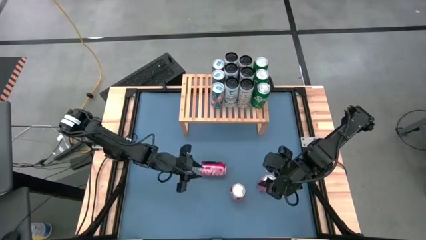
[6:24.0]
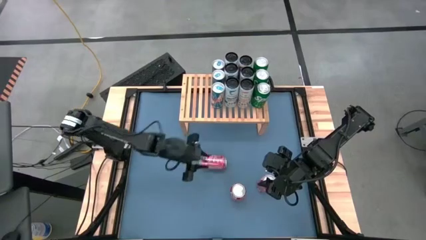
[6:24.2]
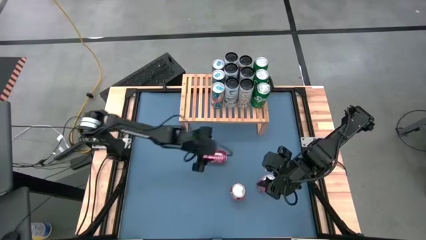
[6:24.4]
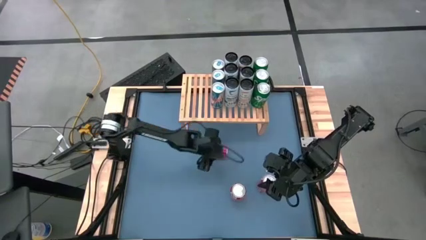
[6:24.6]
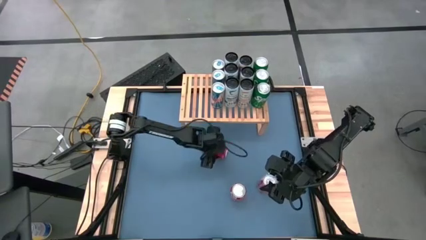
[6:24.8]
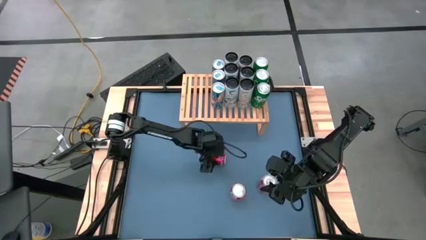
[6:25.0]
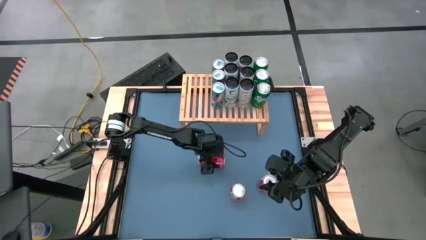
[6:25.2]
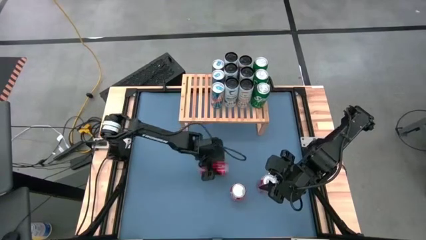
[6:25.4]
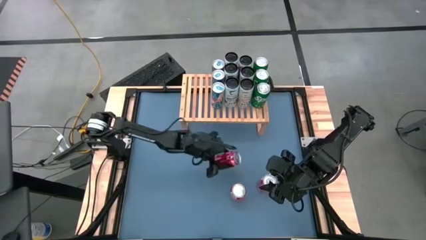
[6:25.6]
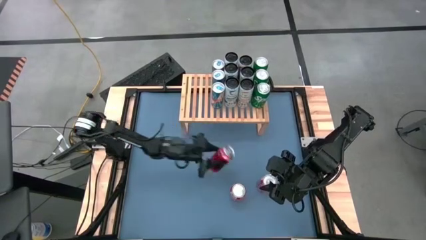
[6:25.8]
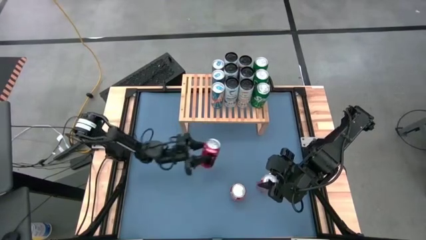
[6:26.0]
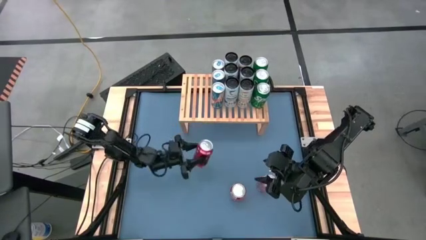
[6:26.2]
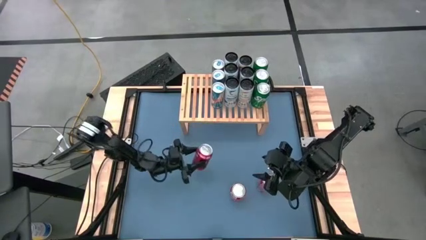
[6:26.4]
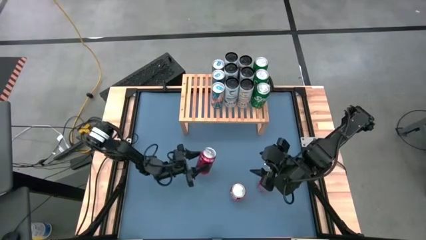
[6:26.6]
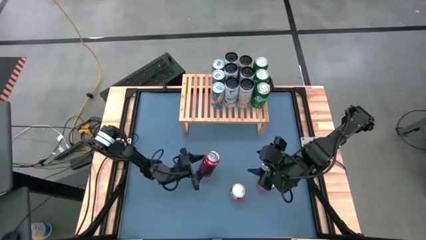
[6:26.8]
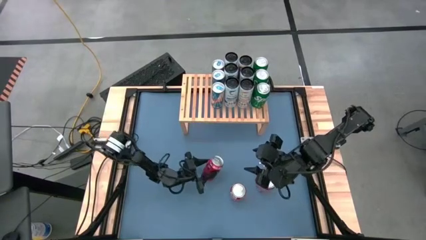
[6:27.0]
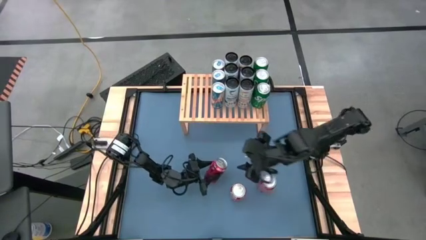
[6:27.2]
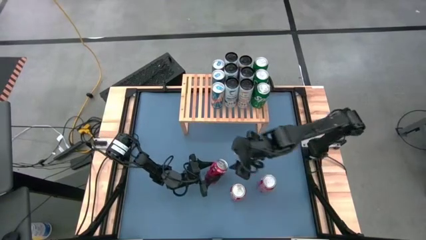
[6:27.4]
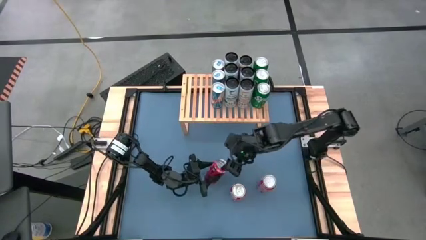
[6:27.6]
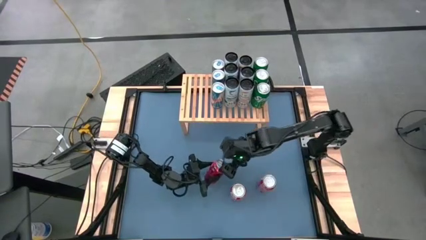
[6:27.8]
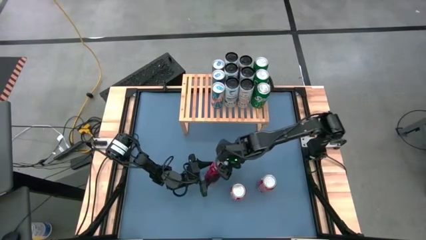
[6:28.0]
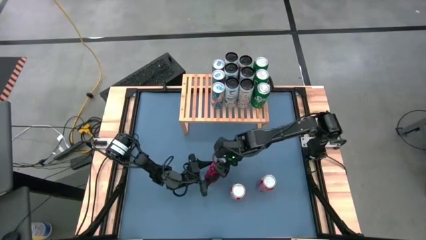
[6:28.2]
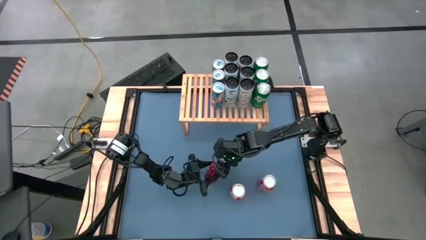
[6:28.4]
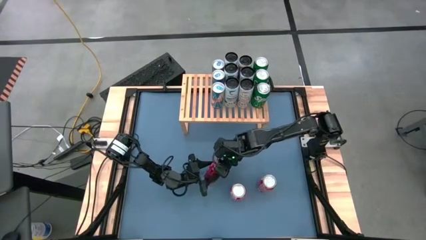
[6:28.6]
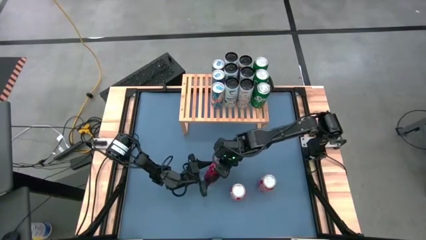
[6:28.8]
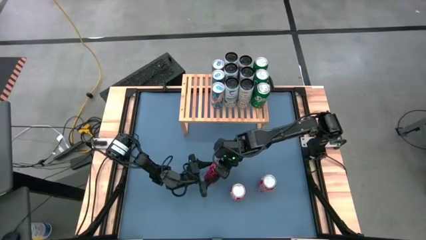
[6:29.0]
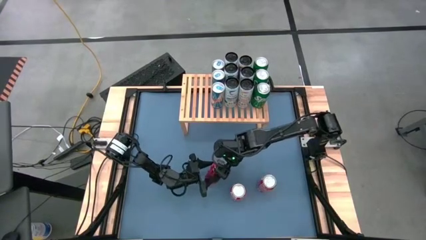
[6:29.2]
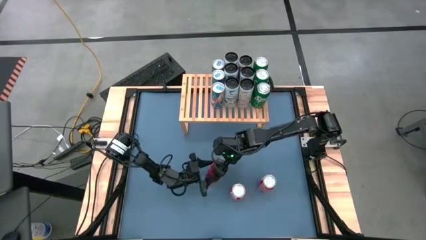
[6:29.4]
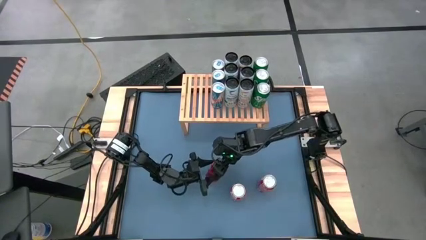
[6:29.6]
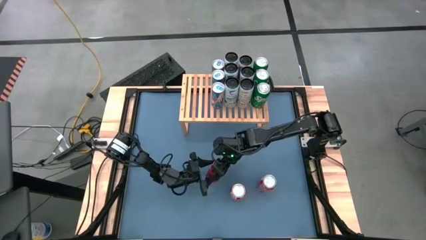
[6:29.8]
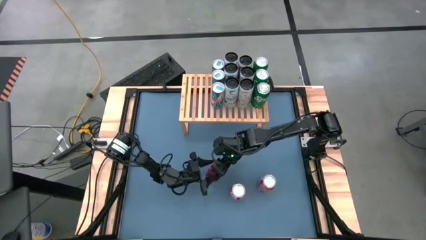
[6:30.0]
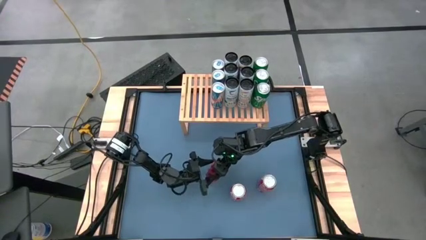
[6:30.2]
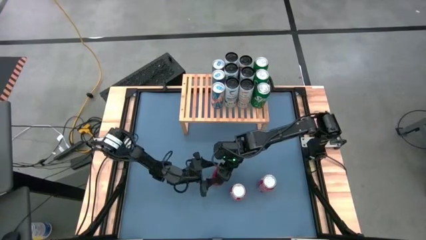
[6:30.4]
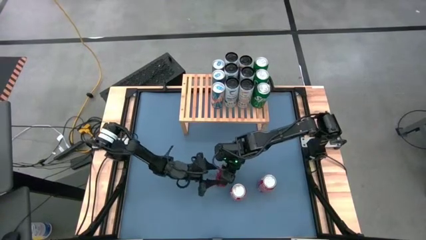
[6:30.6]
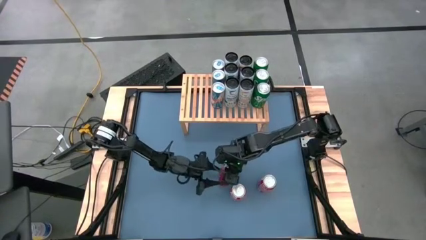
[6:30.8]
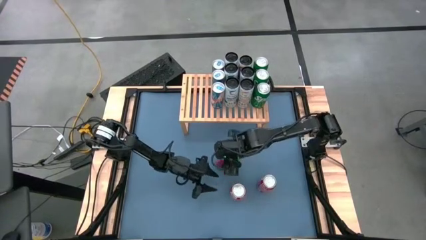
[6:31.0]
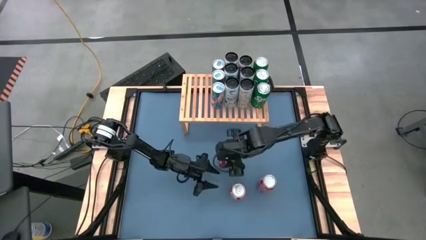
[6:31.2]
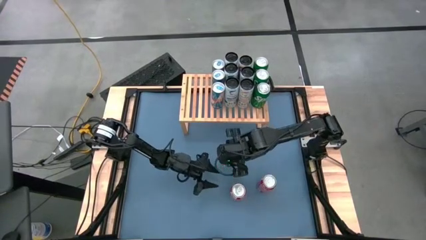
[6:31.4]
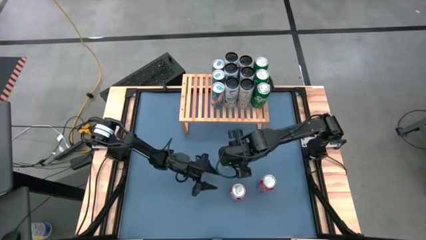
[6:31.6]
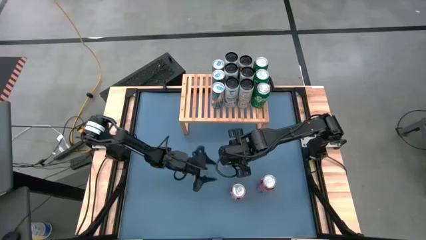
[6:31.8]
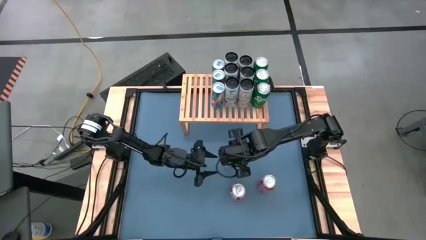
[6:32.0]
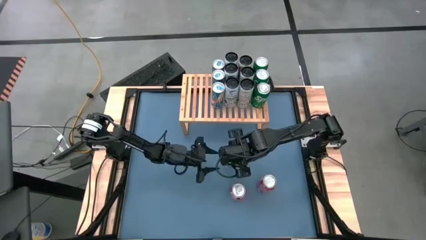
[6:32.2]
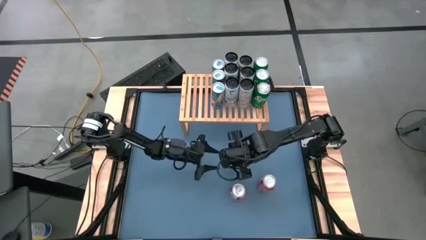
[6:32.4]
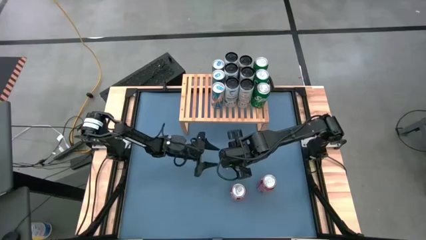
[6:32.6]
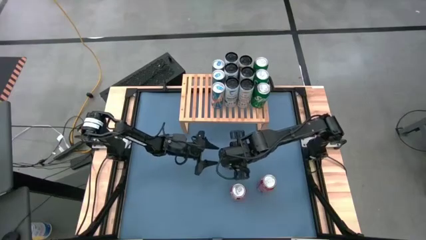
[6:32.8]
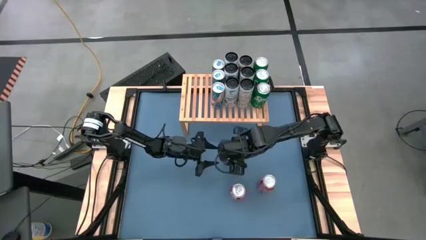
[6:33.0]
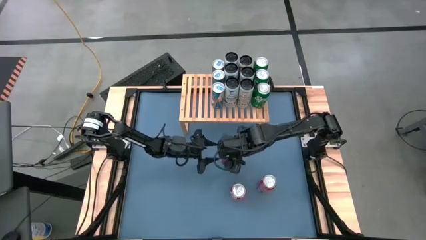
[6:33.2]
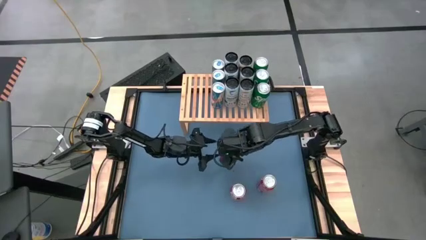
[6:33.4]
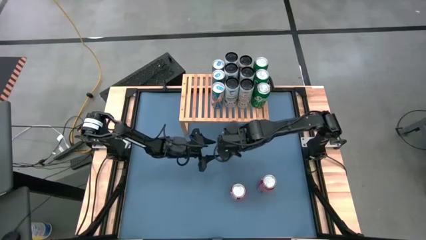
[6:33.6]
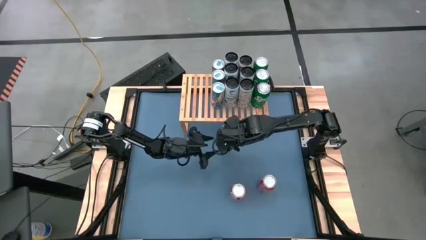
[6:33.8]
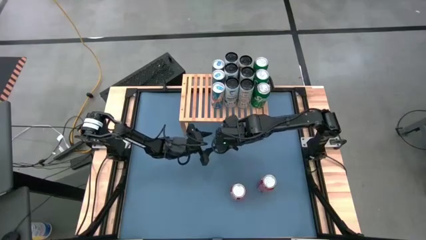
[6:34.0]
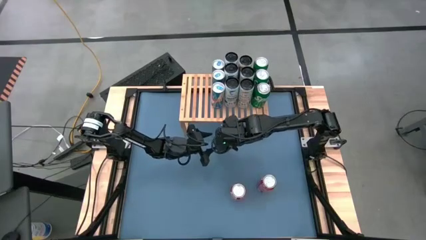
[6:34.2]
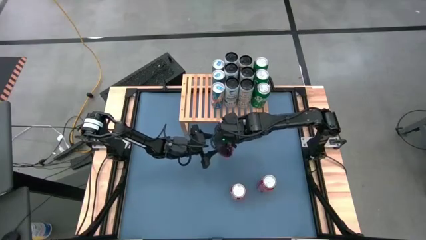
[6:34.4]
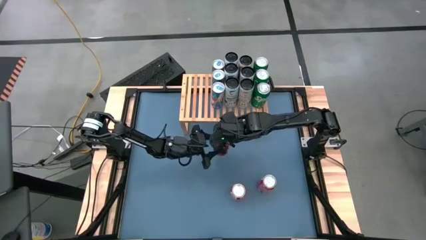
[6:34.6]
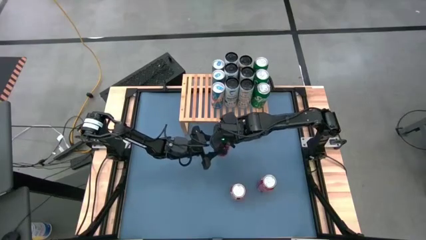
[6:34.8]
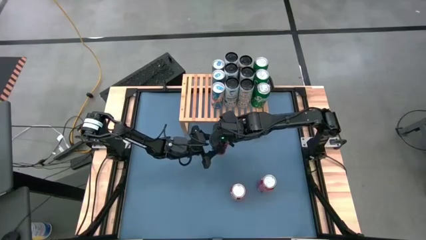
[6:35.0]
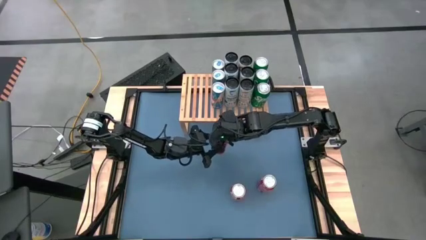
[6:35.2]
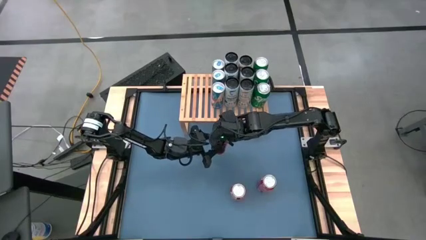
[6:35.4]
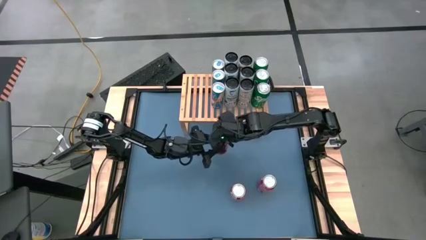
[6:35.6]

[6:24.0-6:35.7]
Task: Place canned beverage on shelf
Put the left red soda can on the shelf
